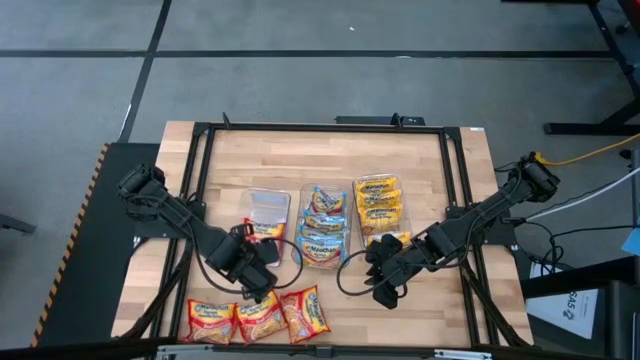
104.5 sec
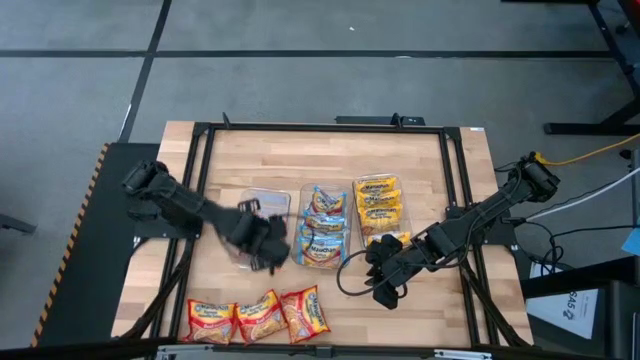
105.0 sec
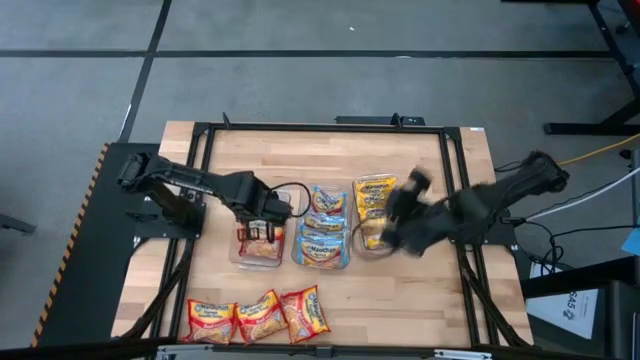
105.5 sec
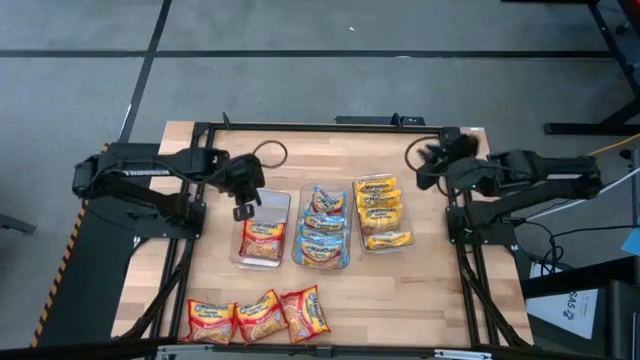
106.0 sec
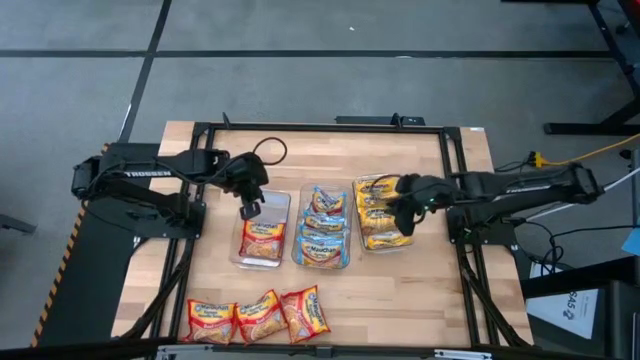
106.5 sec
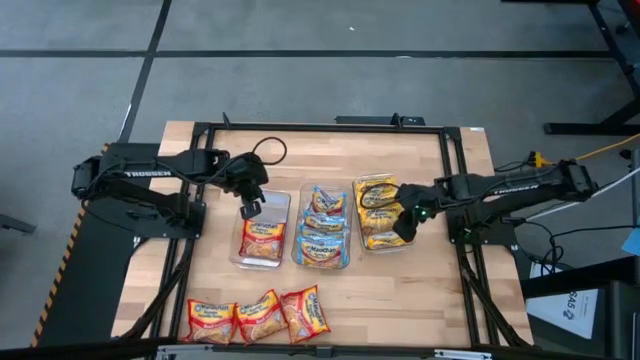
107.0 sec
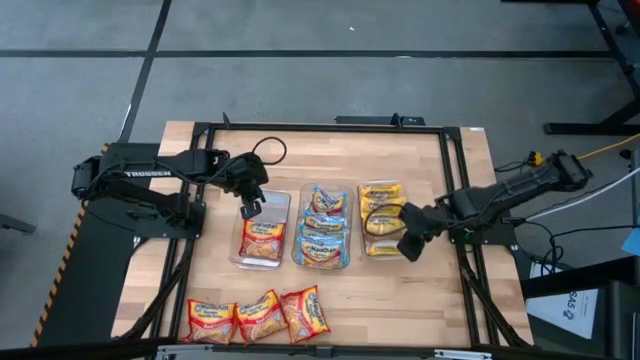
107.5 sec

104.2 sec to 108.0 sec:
Task: Sort Maruchan noodles
Adjust the right transparent bin

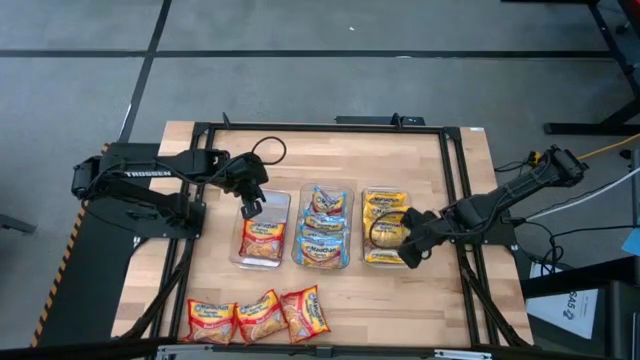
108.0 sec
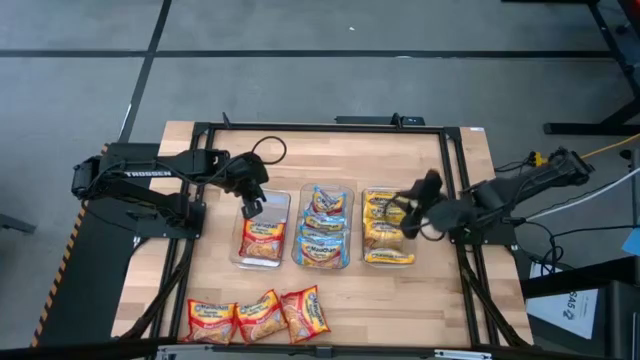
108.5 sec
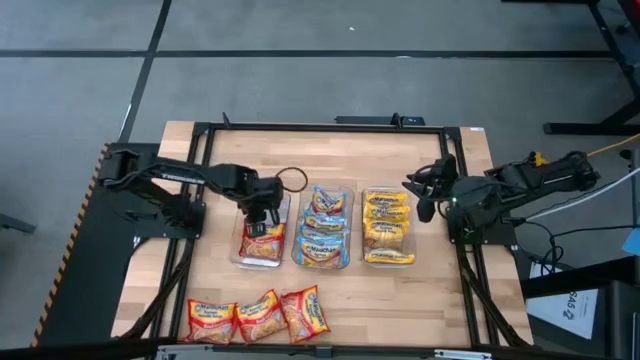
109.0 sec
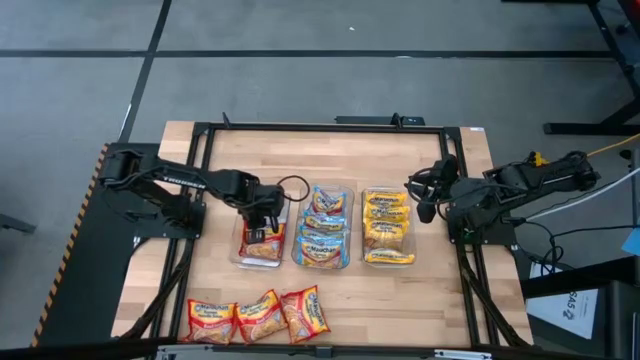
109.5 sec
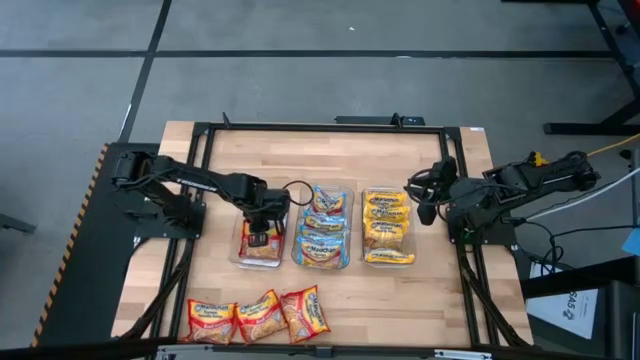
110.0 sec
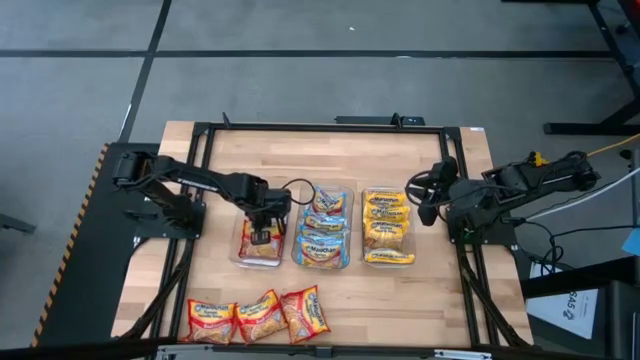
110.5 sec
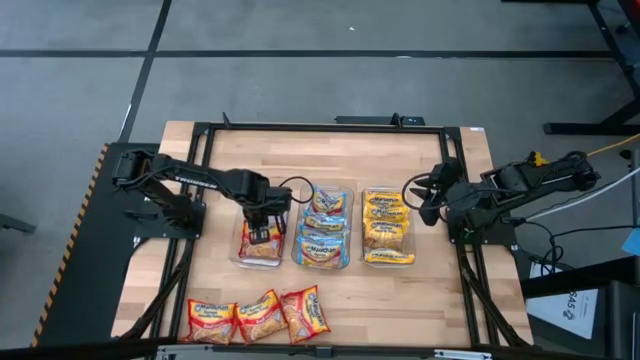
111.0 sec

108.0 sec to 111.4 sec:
Adjust the red noodle pack

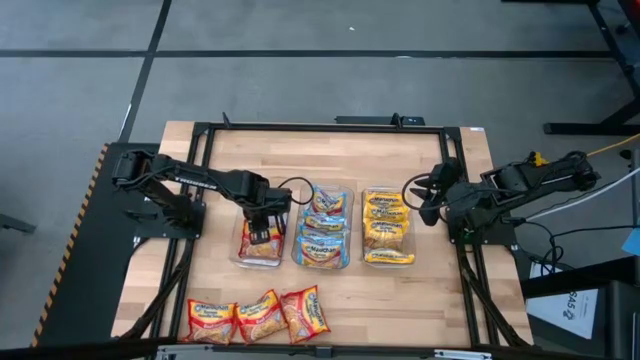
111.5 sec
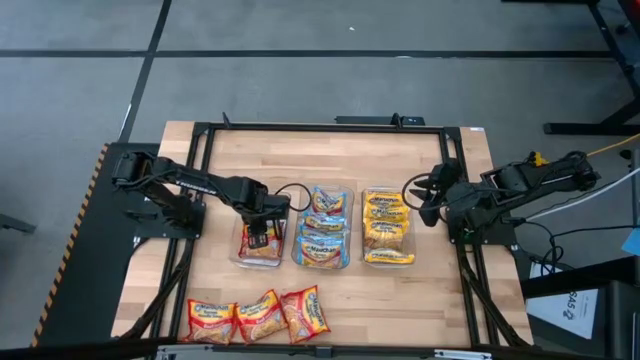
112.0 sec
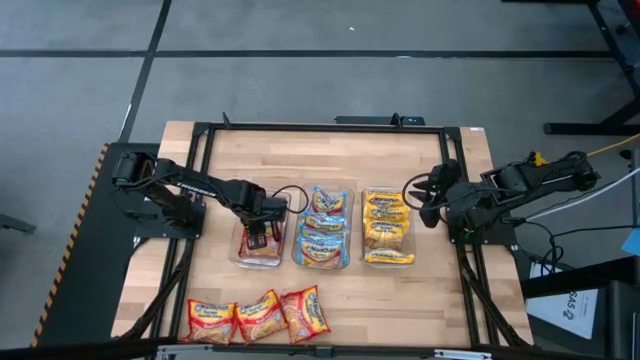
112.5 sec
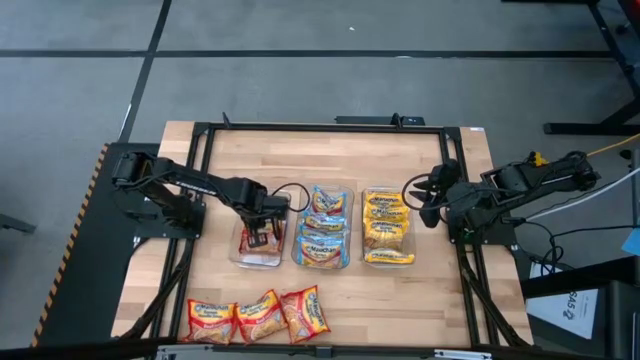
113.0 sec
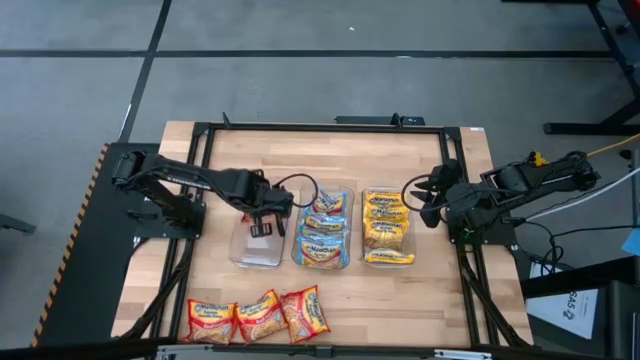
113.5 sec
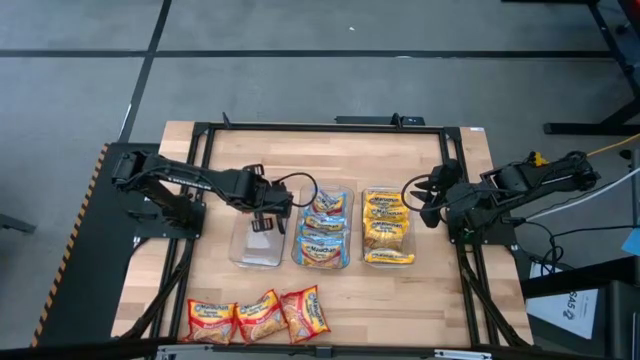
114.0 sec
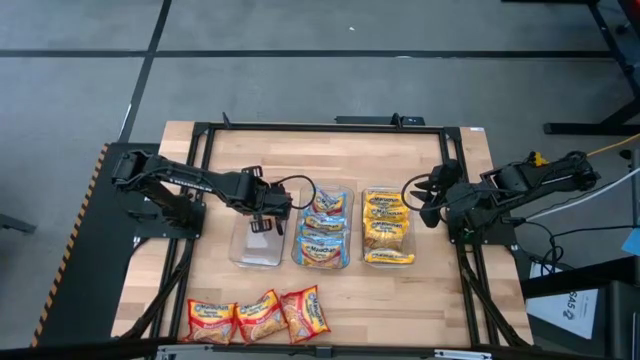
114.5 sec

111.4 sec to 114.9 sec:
Adjust the red noodle pack

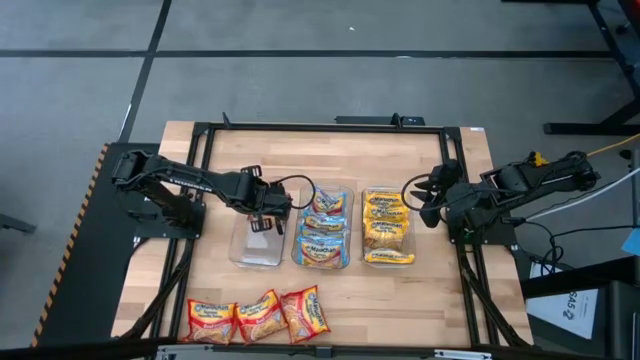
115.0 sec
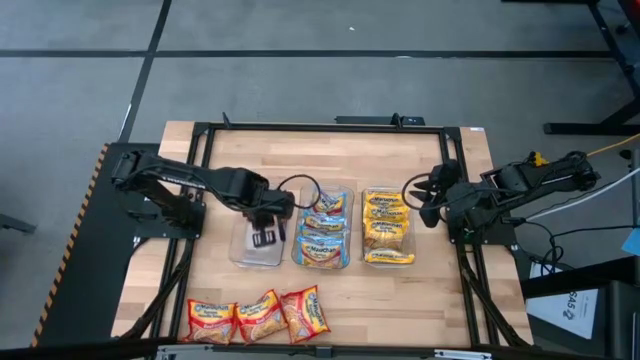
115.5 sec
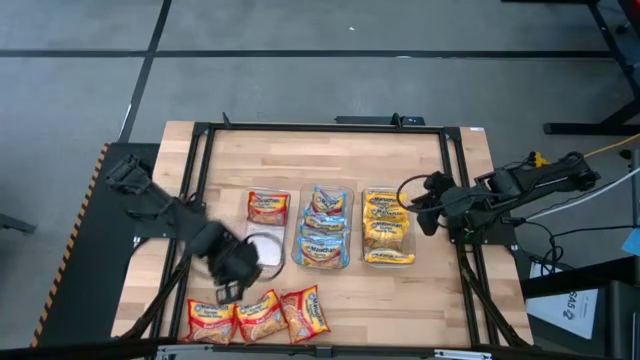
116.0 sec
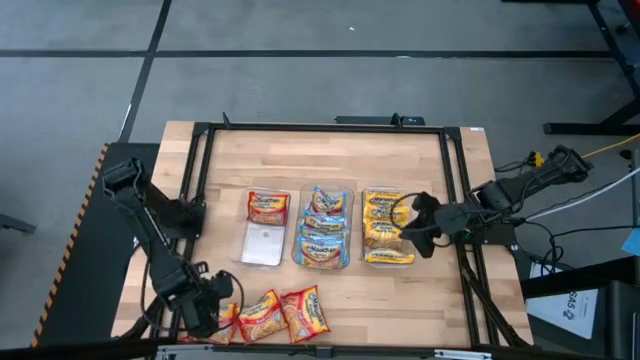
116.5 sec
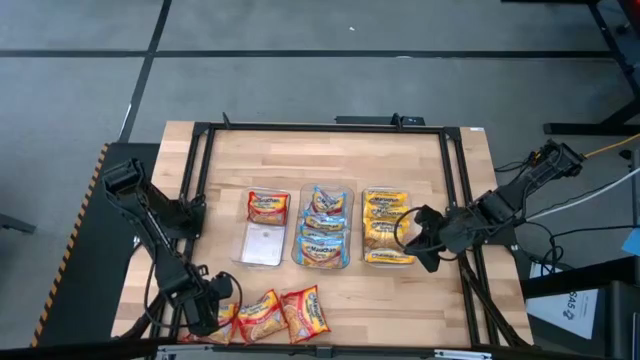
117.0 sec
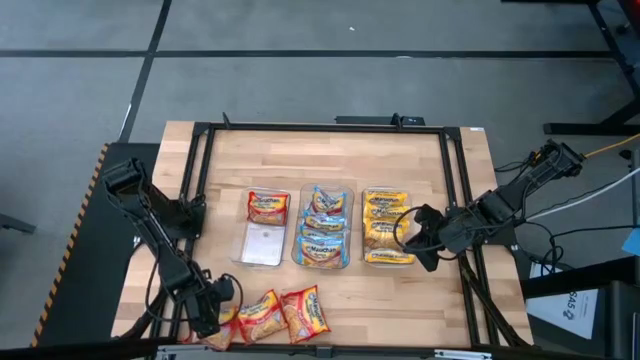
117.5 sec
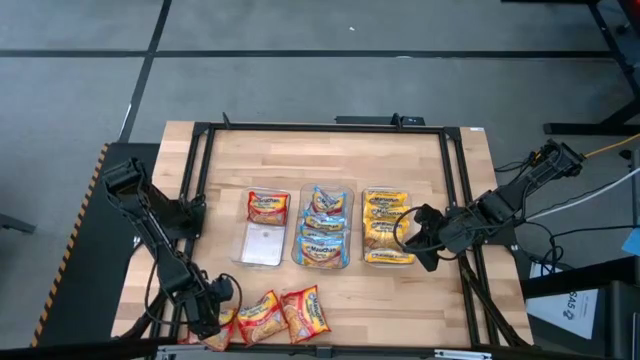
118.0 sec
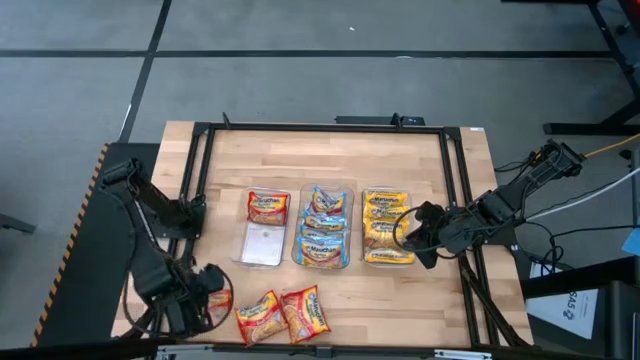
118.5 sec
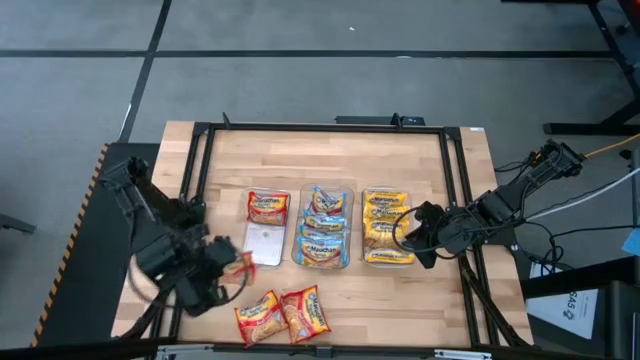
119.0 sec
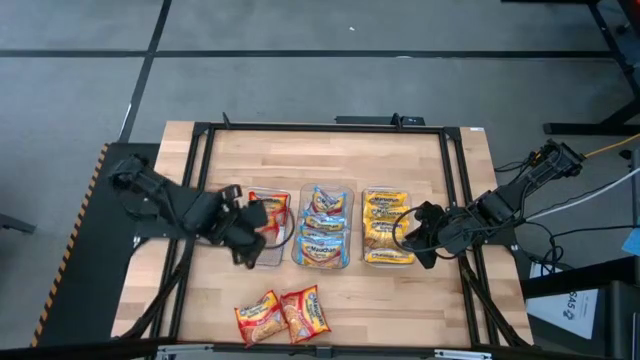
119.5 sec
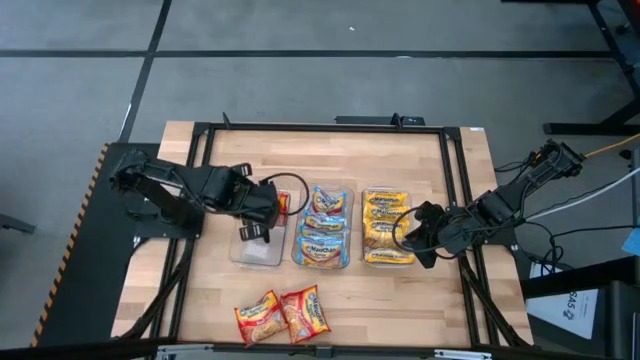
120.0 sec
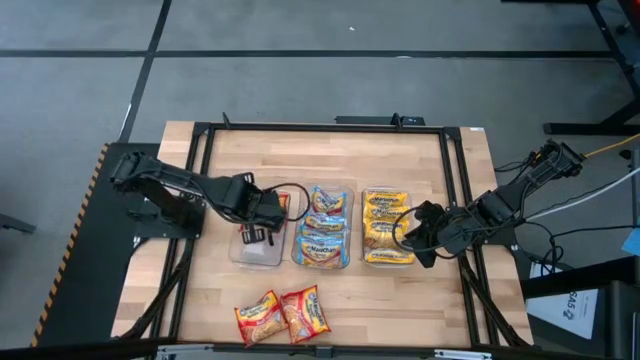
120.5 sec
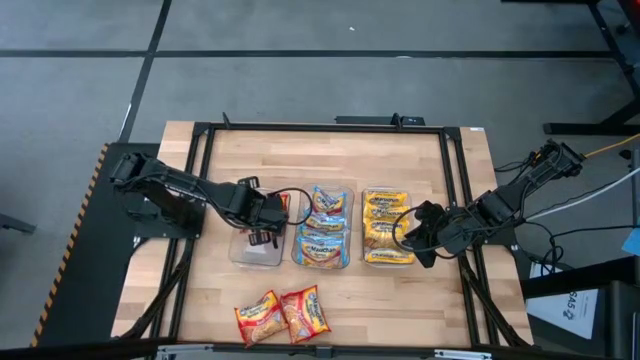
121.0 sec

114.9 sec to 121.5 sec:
Put the red noodle pack into the left transparent bin

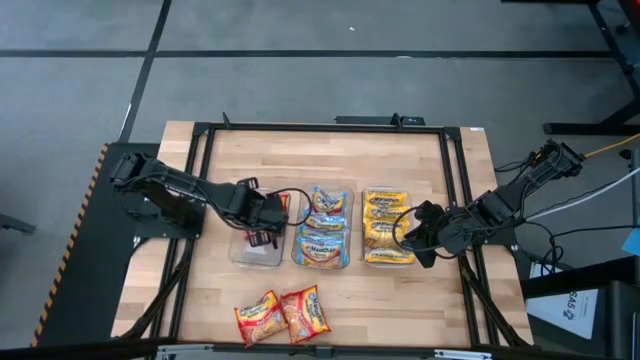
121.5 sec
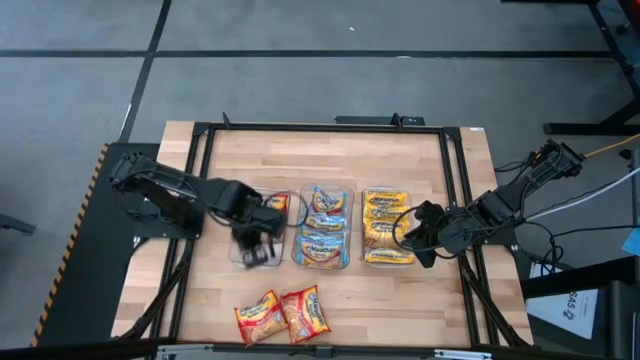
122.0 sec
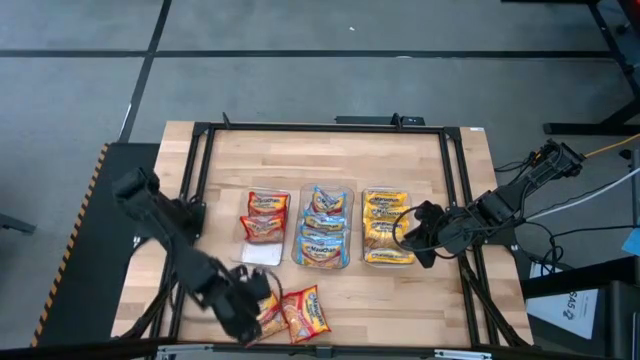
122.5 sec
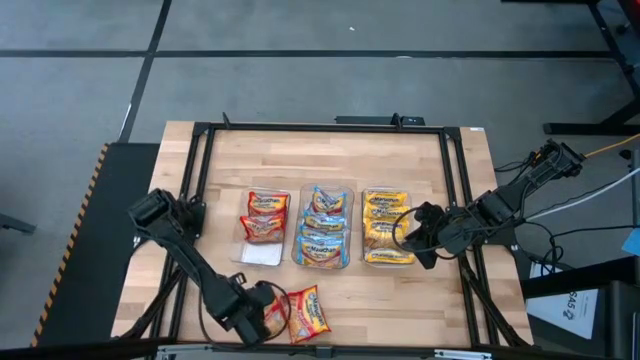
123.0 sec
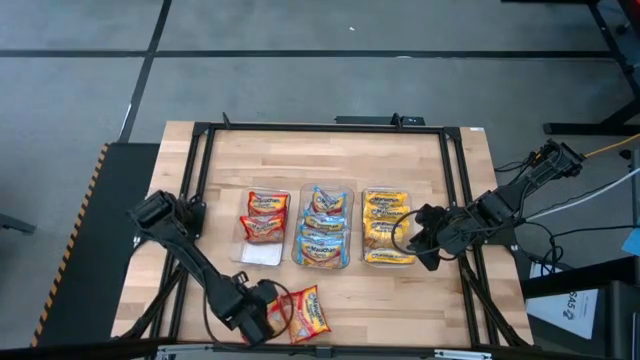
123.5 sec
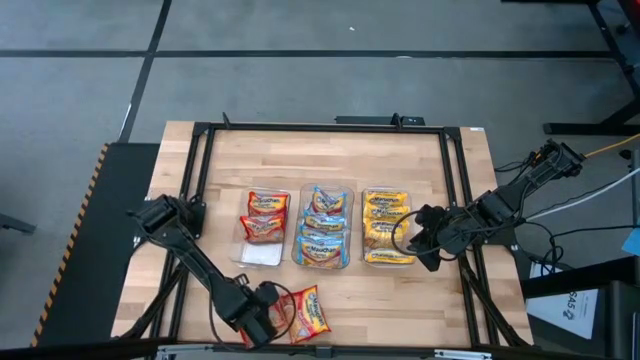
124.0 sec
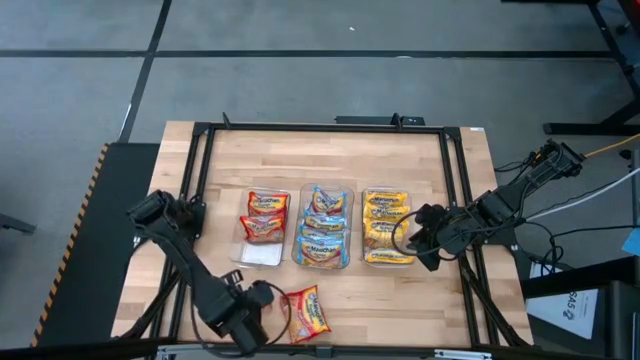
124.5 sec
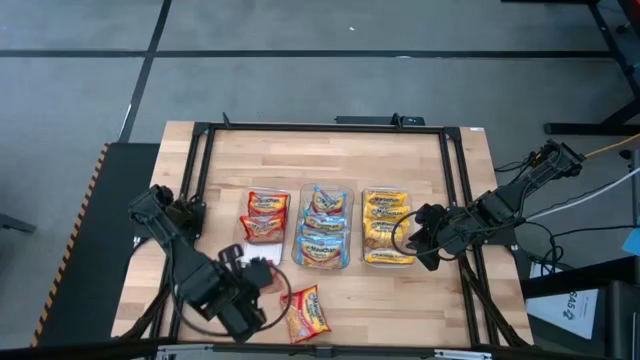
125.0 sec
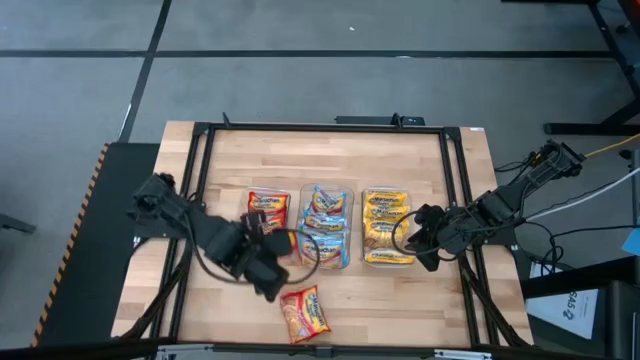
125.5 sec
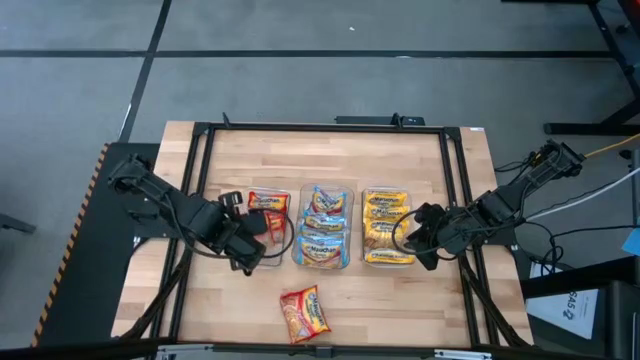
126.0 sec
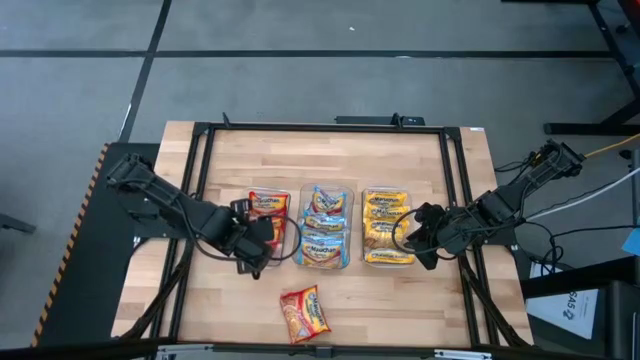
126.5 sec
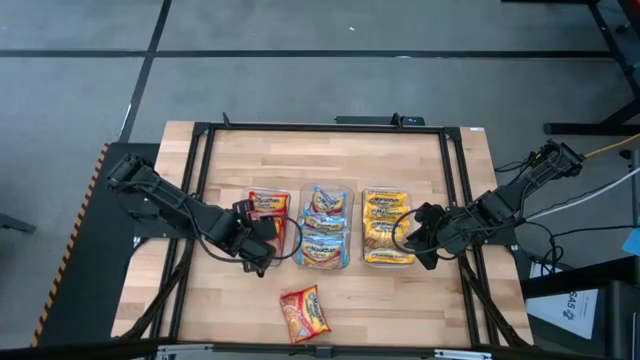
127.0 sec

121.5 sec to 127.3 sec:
Put the red noodle pack into the left transparent bin
